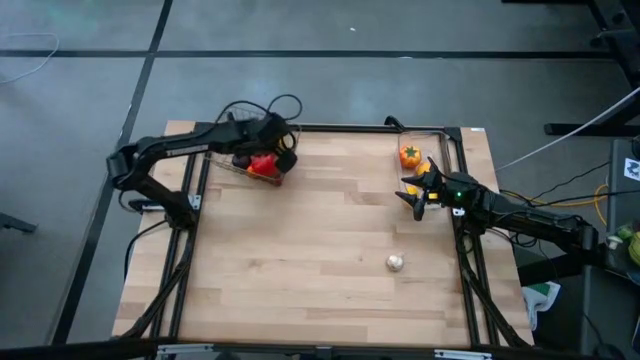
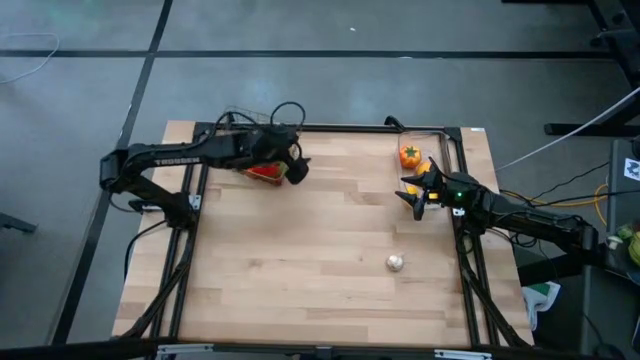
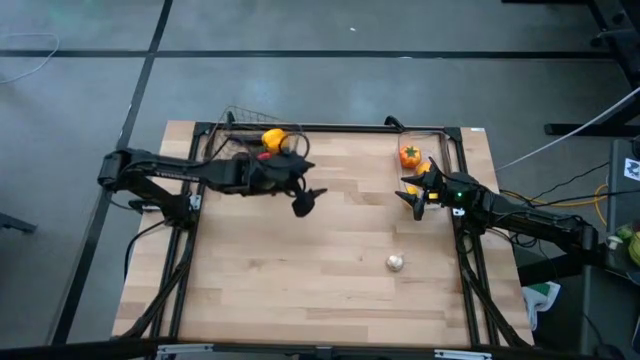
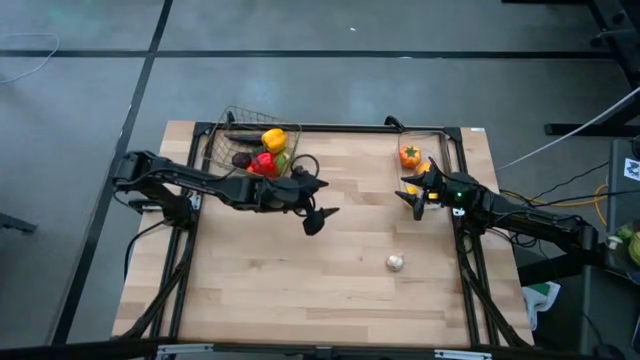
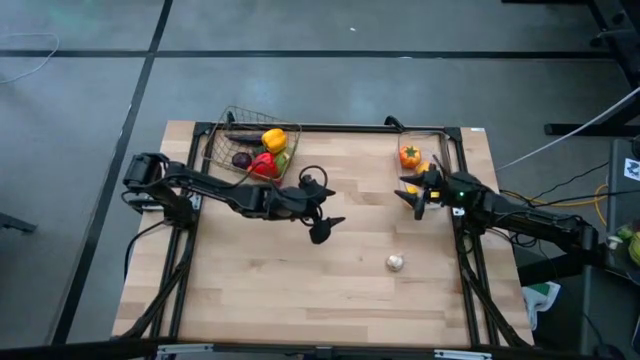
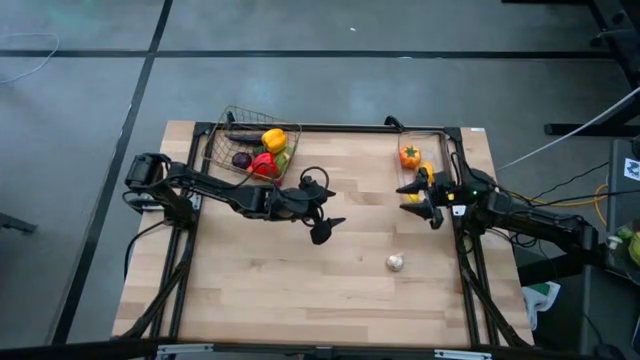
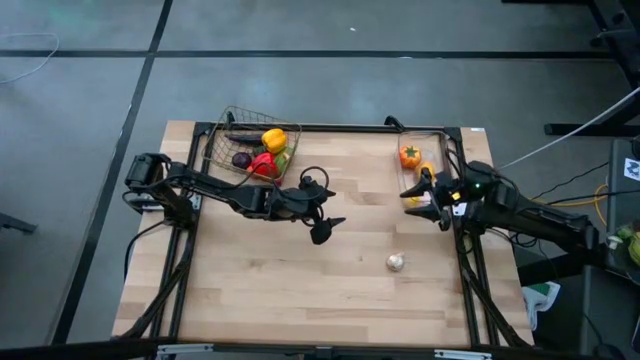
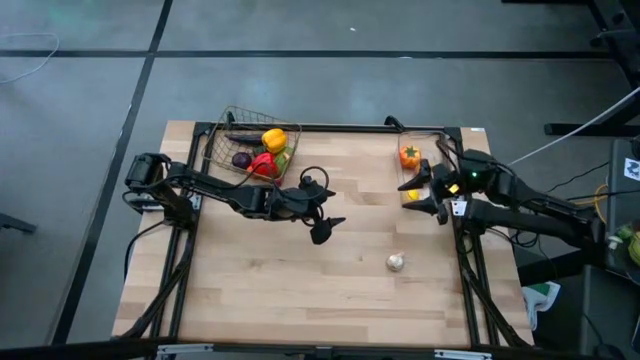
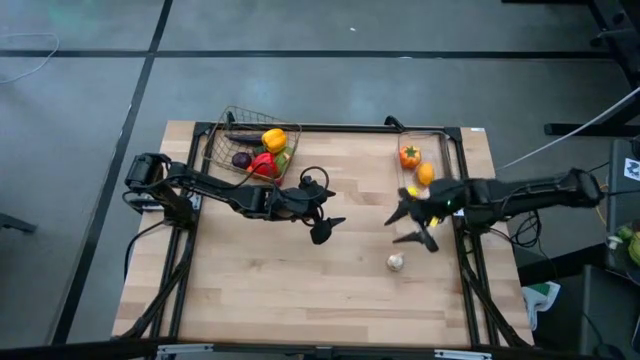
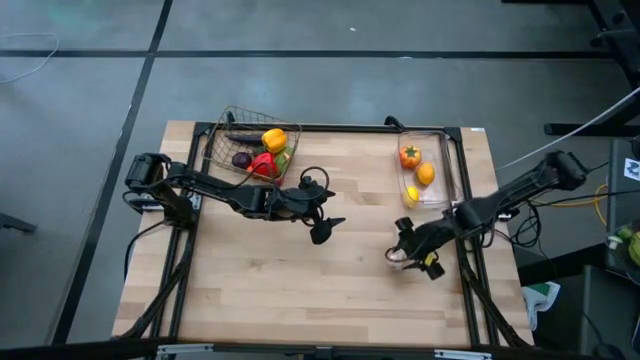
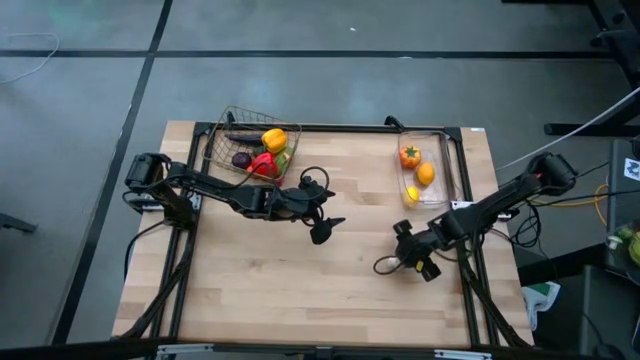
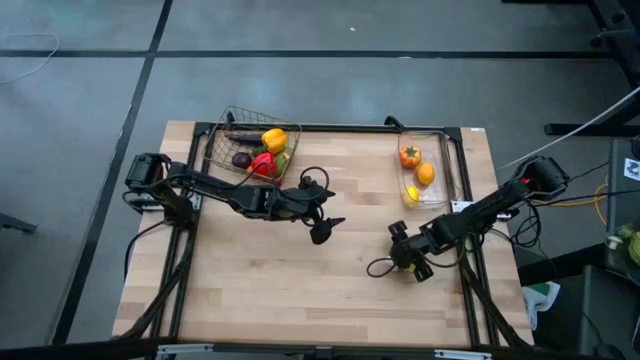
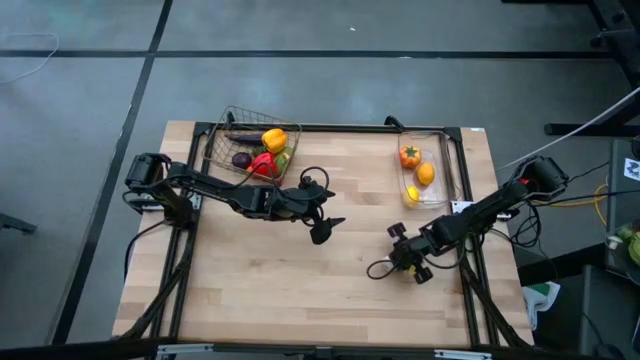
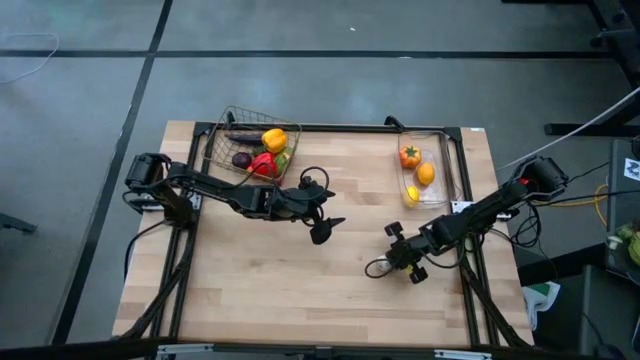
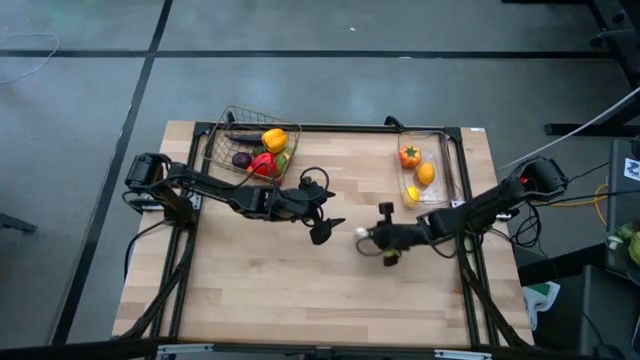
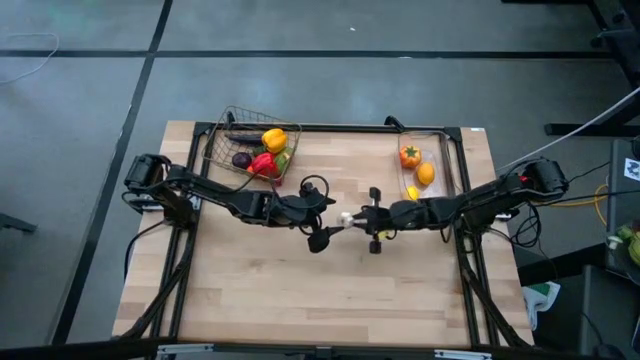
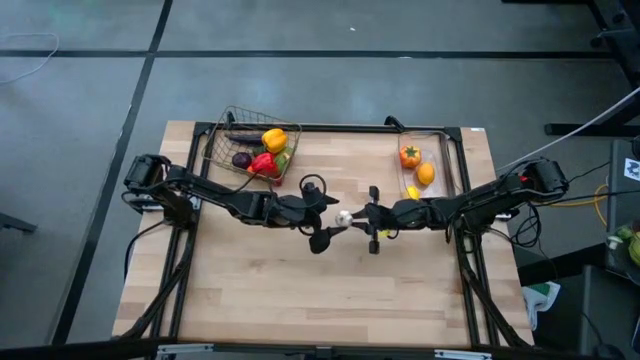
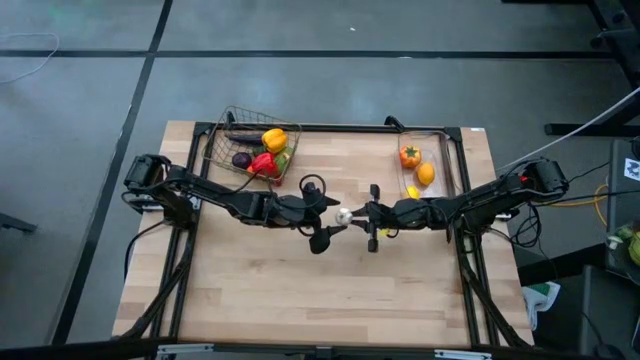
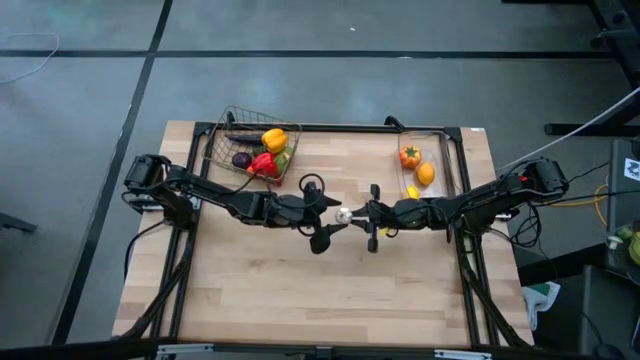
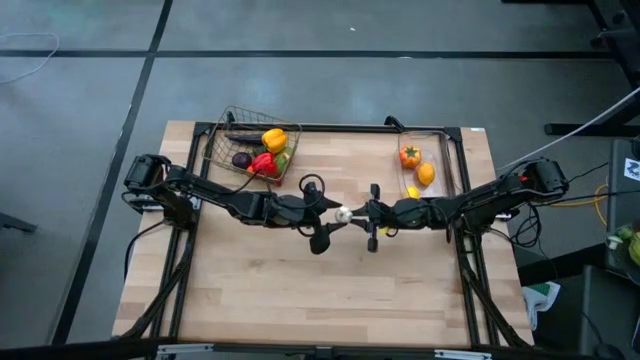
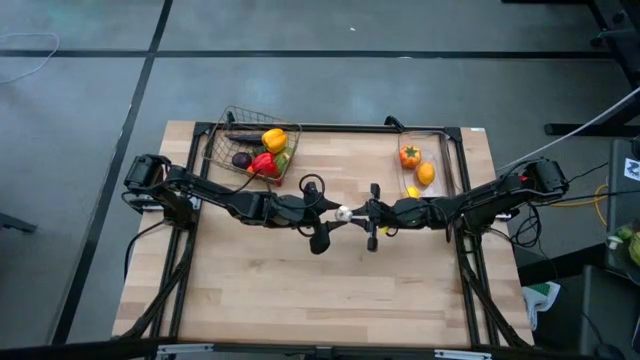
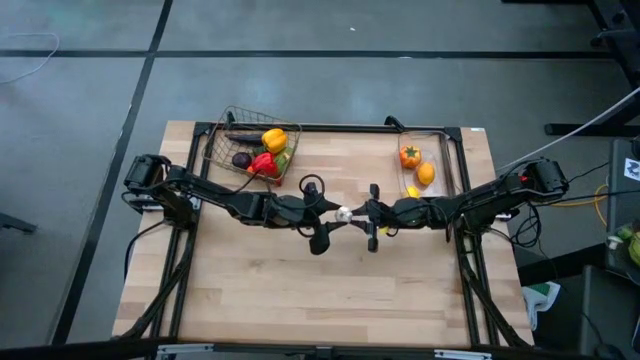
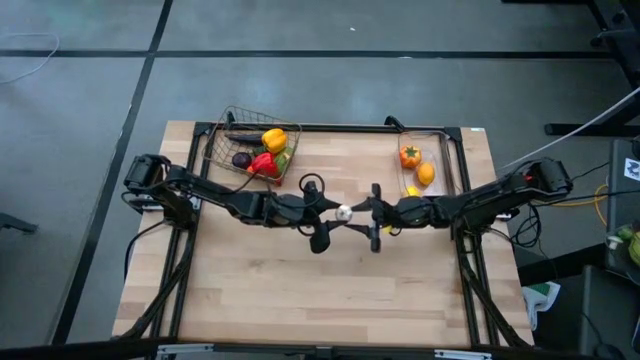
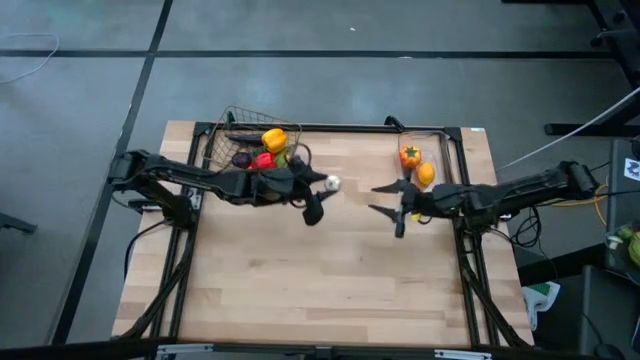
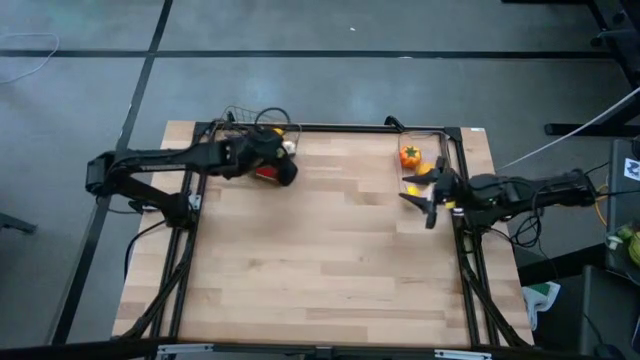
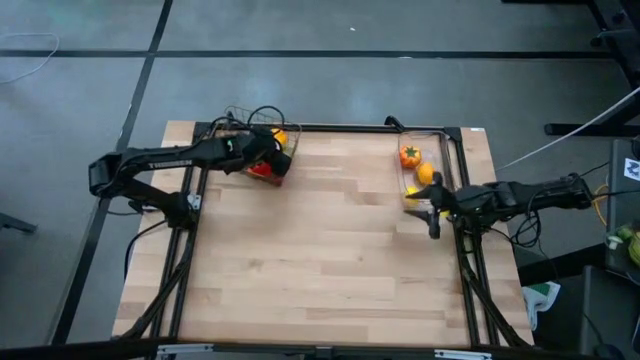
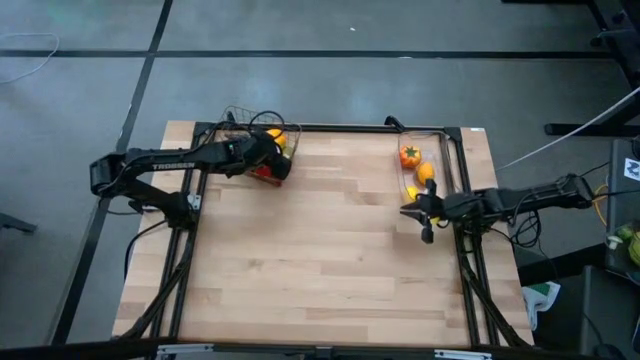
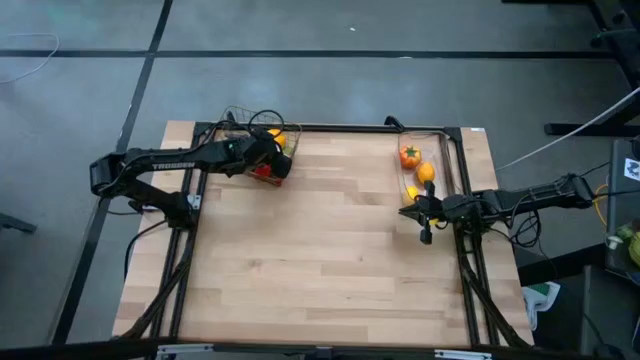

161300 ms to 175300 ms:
Task: Sort produce into baskets
Put the white garlic into the silver wire basket

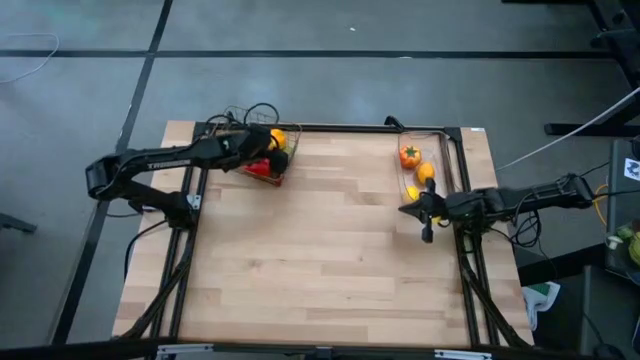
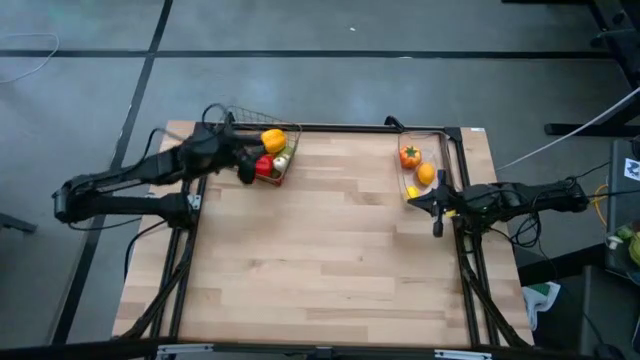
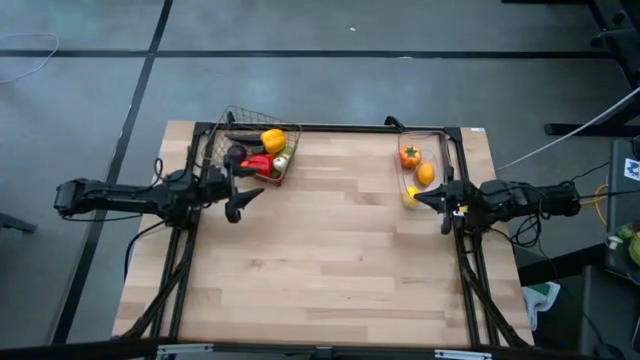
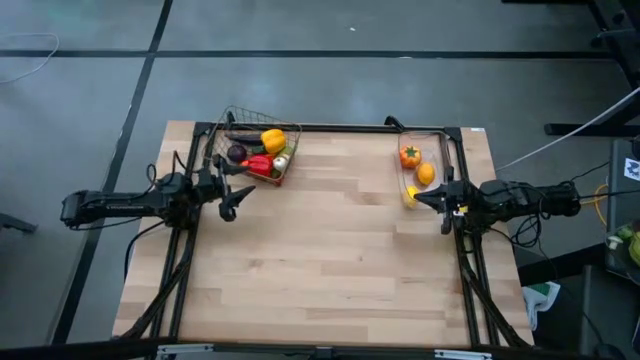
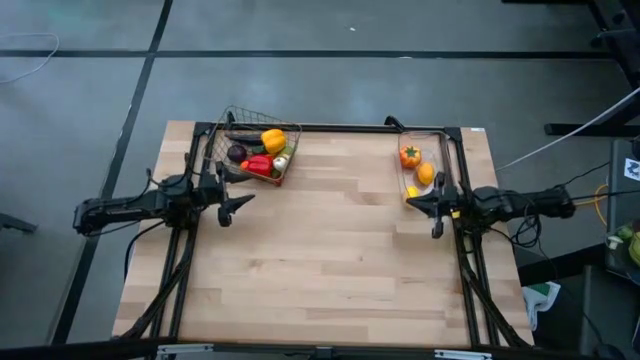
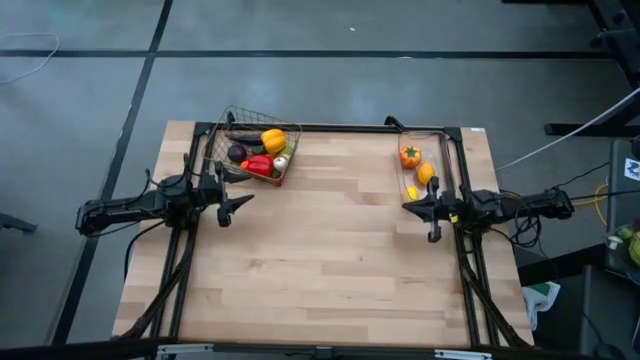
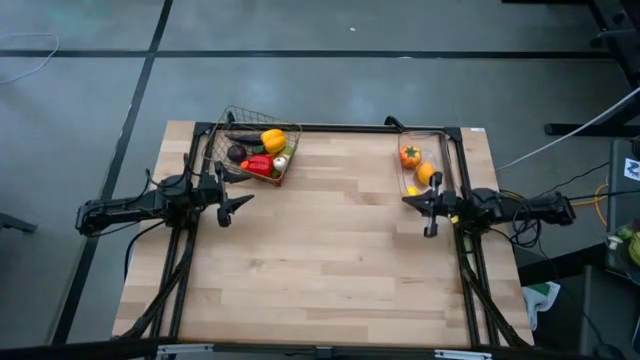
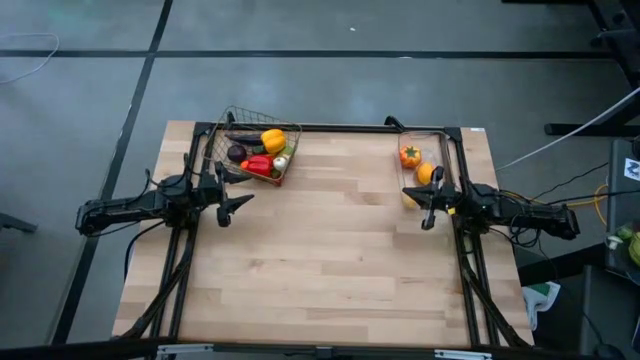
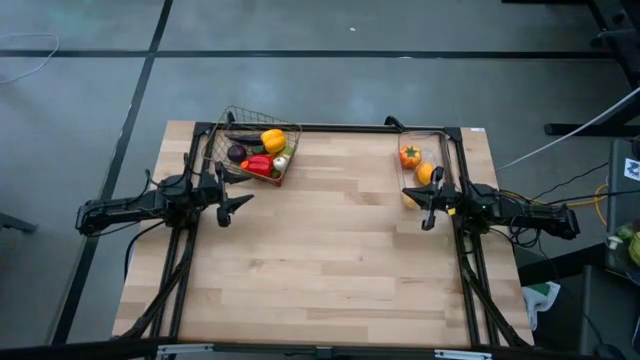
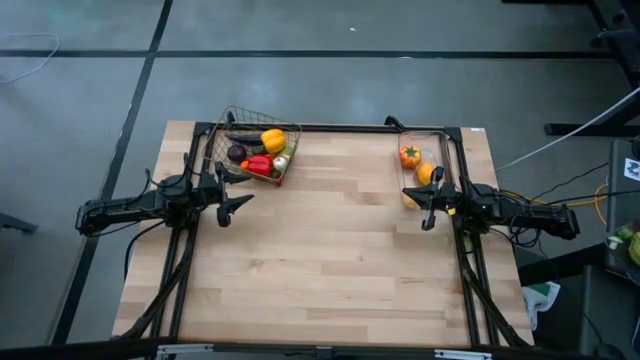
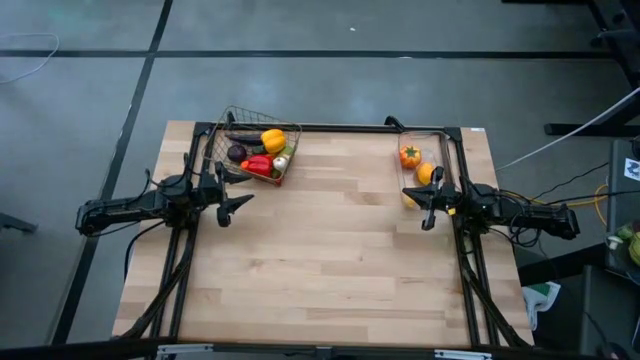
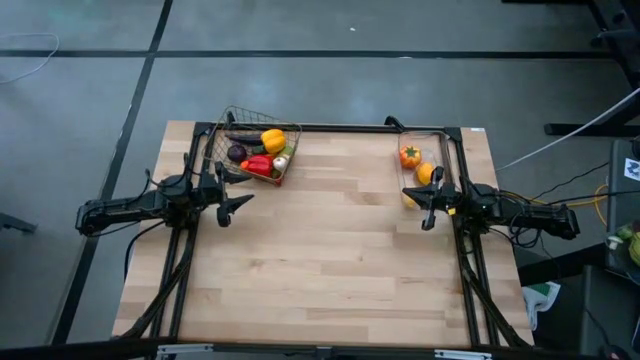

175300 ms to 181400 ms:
Return to Home Position

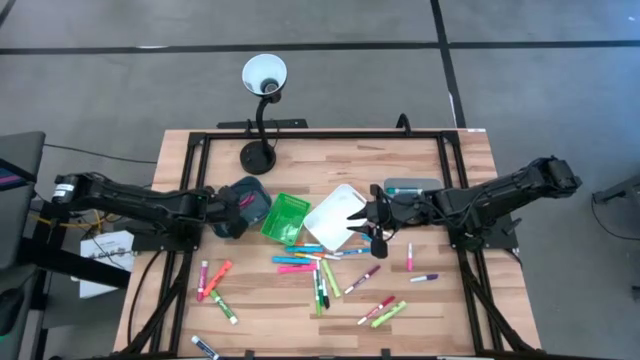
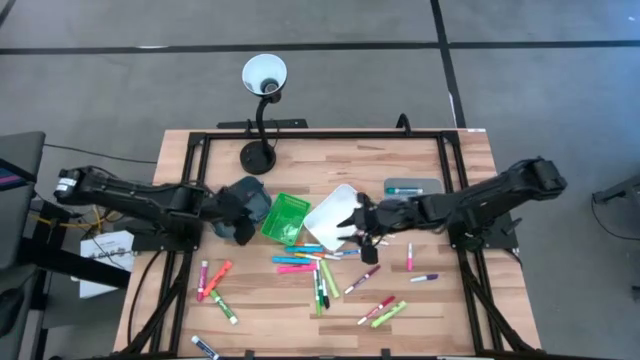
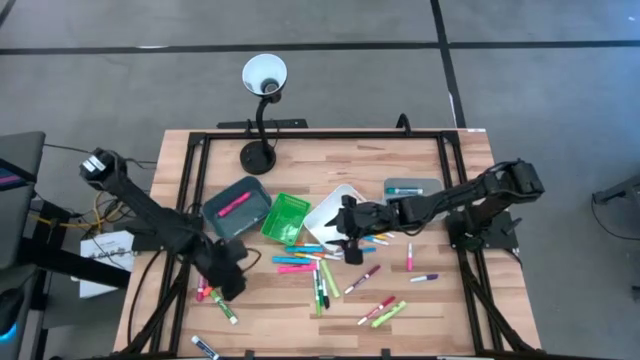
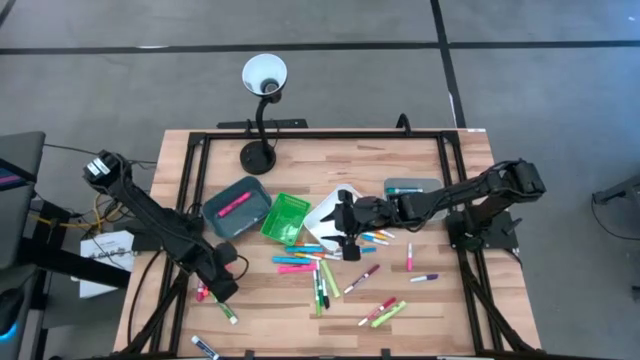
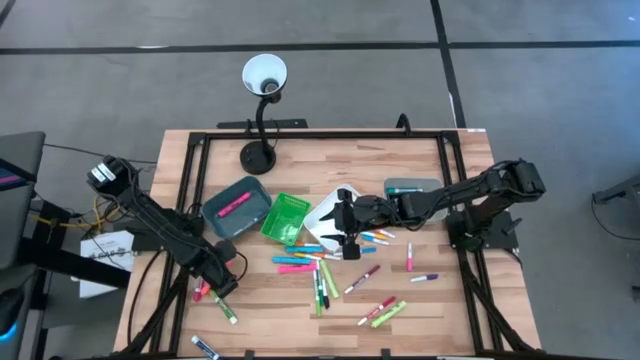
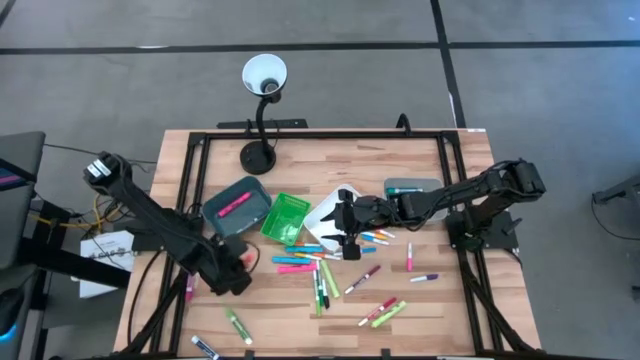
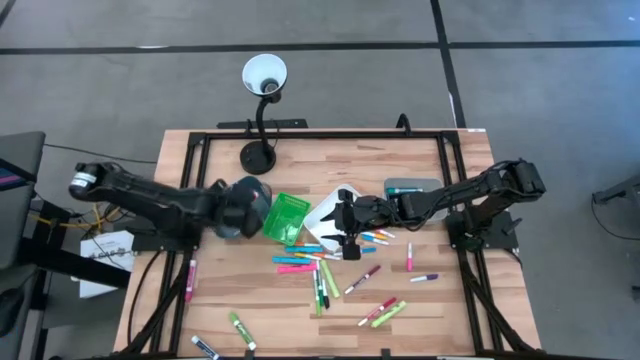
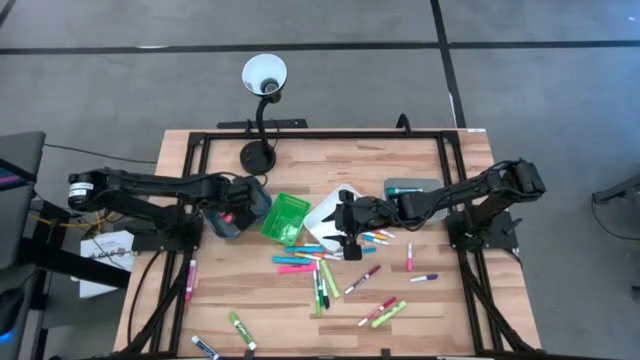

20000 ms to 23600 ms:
Task: Pick & Place Markers
Put the orange highlighter pen into the blue bin
